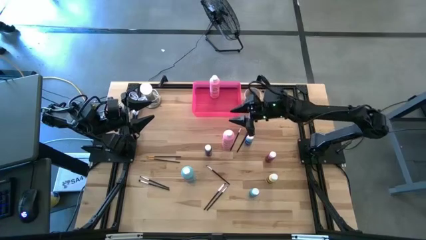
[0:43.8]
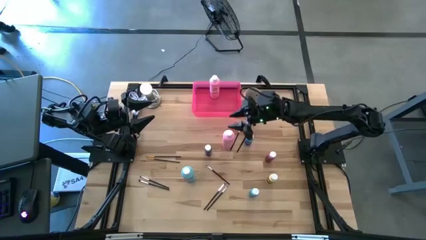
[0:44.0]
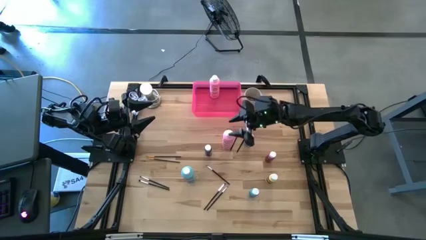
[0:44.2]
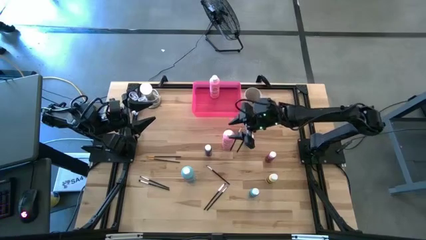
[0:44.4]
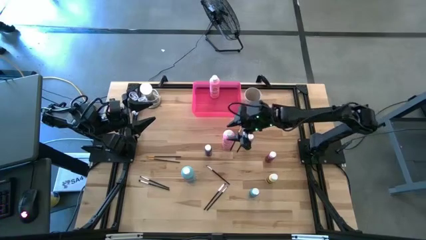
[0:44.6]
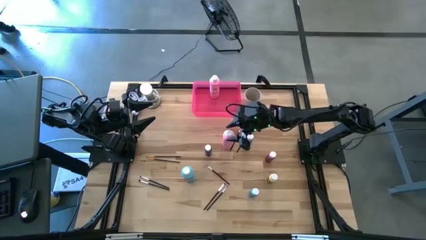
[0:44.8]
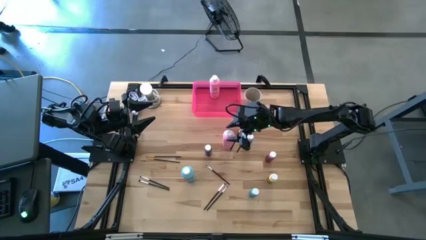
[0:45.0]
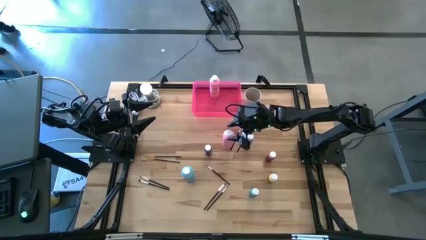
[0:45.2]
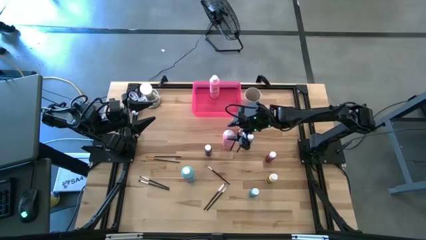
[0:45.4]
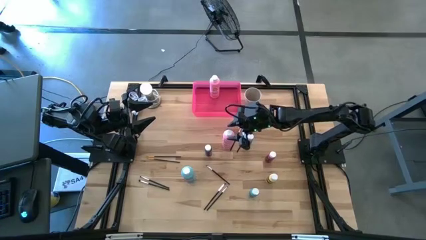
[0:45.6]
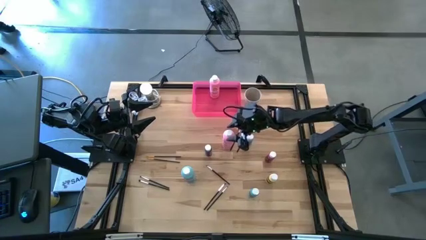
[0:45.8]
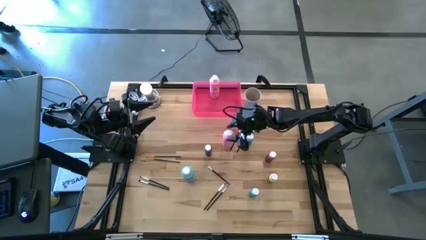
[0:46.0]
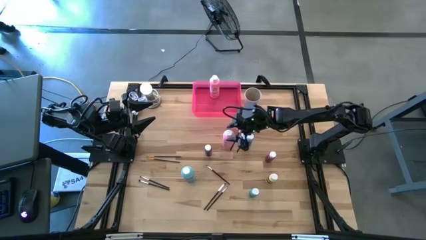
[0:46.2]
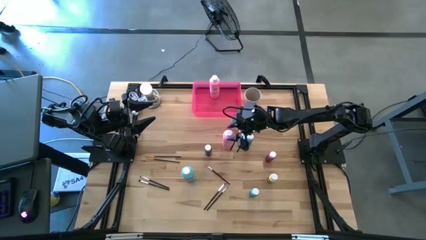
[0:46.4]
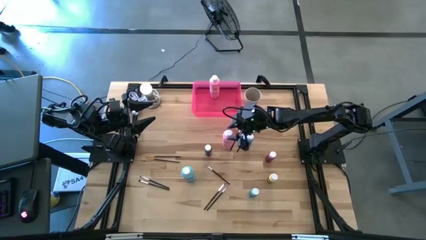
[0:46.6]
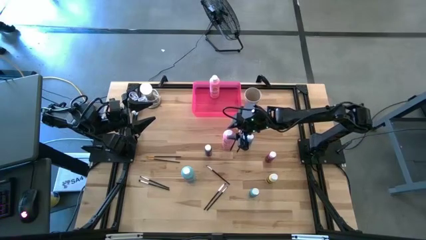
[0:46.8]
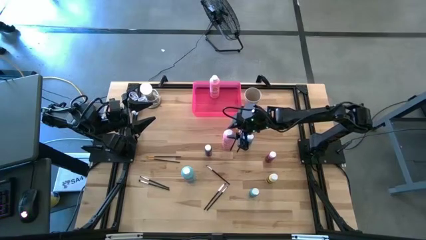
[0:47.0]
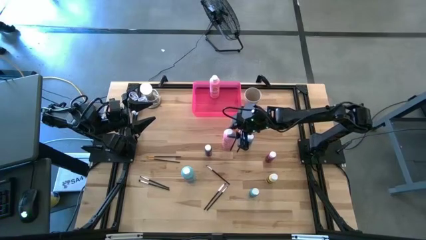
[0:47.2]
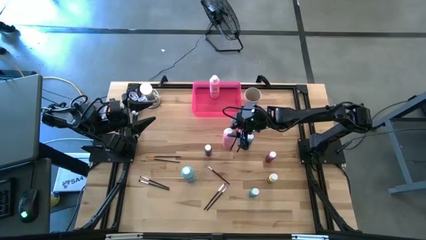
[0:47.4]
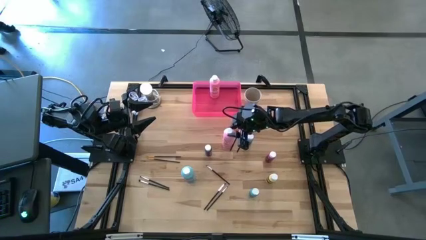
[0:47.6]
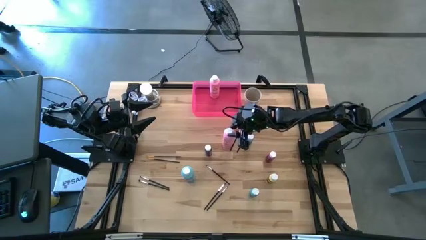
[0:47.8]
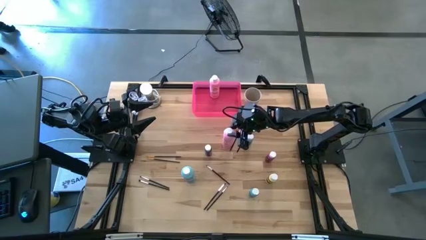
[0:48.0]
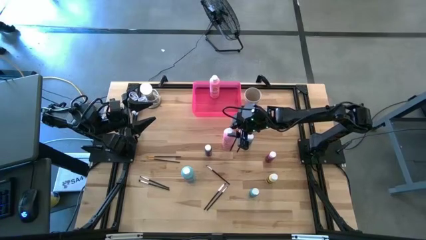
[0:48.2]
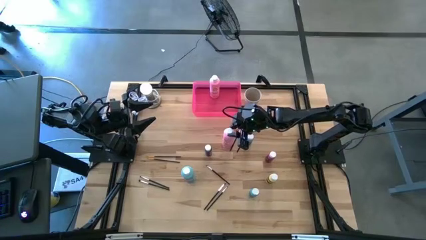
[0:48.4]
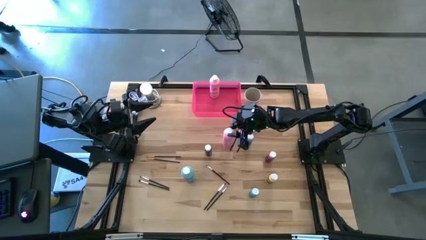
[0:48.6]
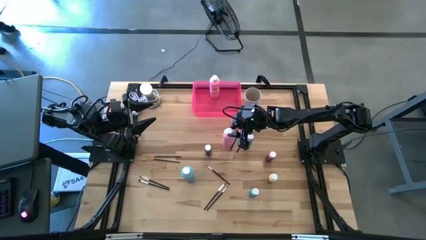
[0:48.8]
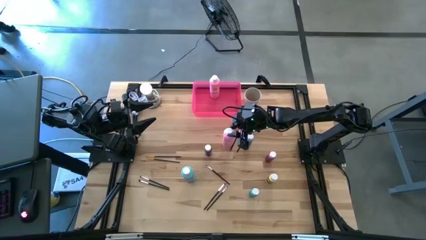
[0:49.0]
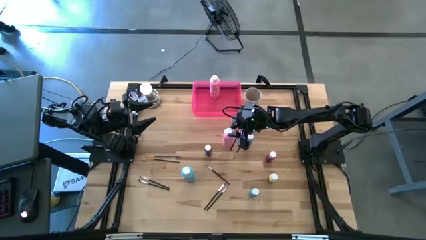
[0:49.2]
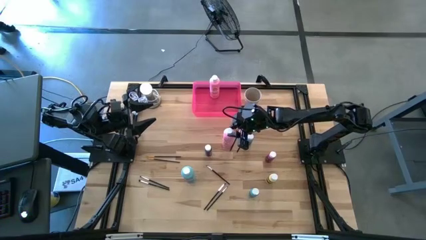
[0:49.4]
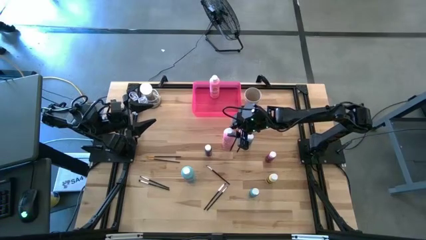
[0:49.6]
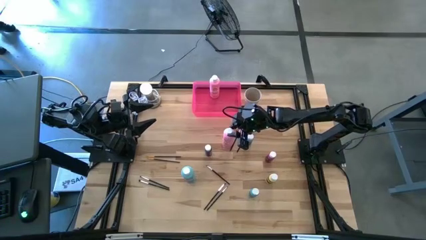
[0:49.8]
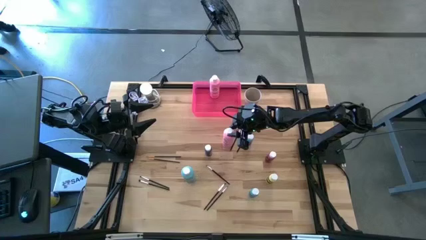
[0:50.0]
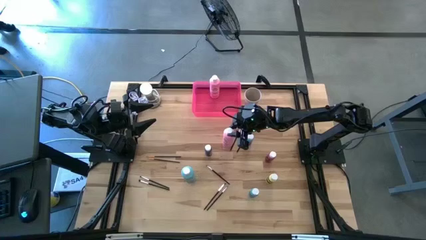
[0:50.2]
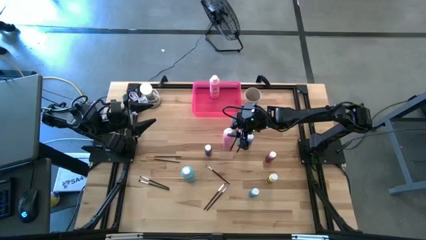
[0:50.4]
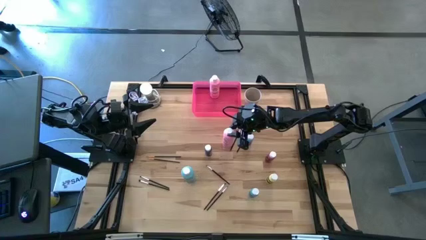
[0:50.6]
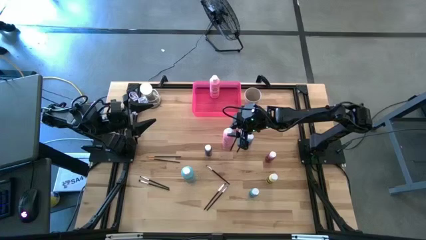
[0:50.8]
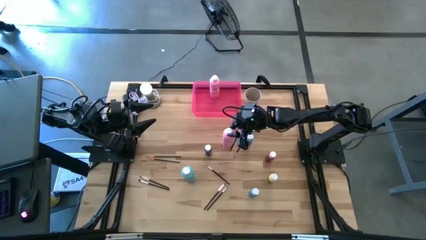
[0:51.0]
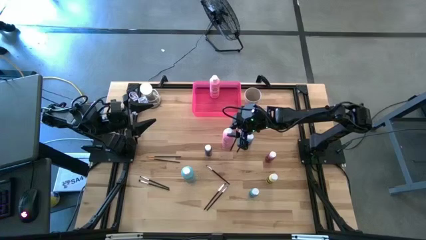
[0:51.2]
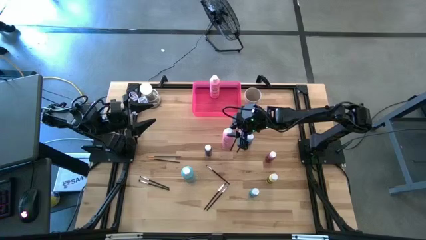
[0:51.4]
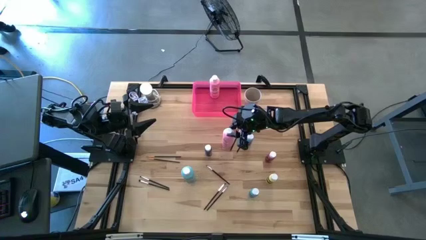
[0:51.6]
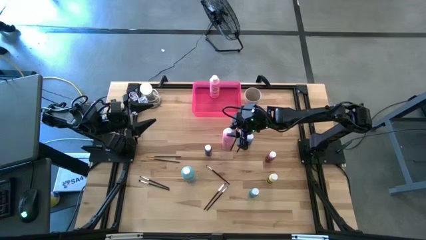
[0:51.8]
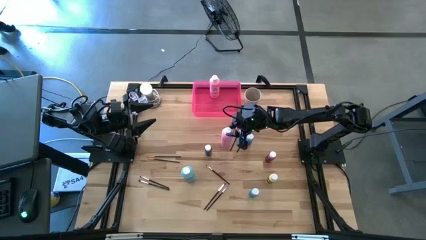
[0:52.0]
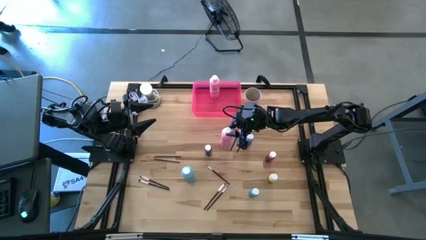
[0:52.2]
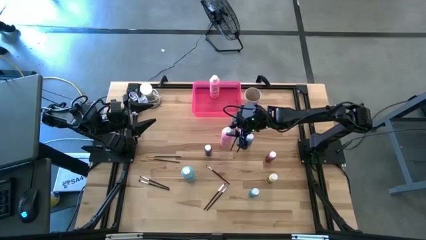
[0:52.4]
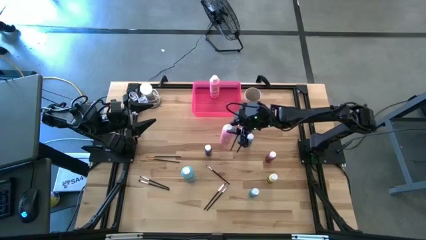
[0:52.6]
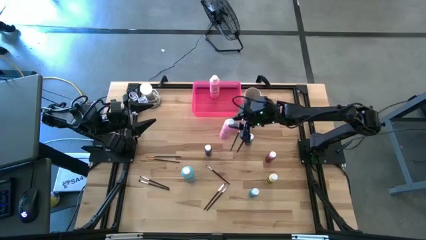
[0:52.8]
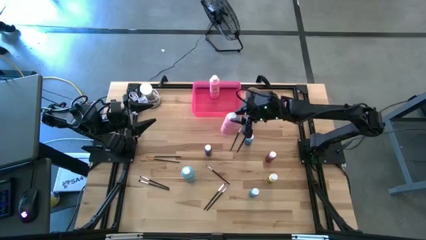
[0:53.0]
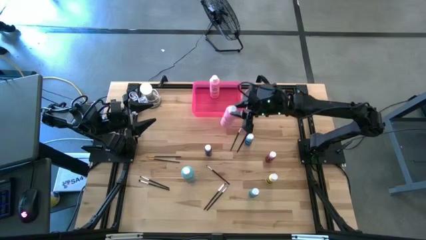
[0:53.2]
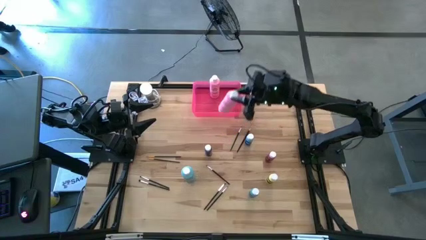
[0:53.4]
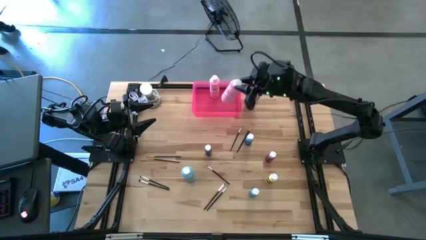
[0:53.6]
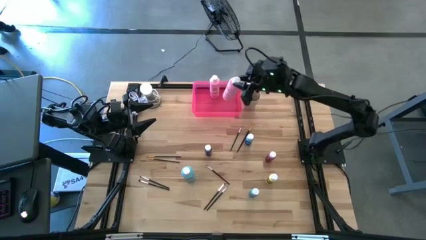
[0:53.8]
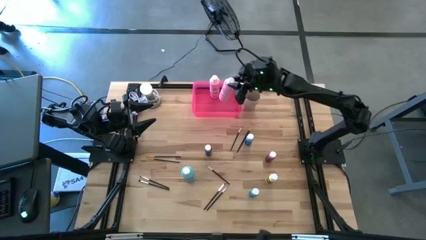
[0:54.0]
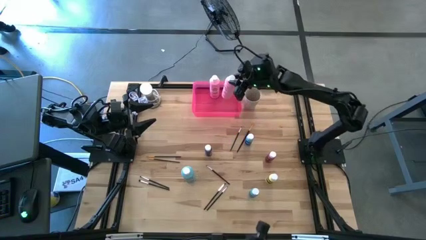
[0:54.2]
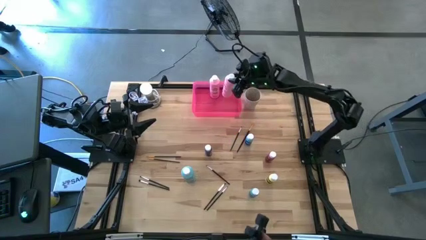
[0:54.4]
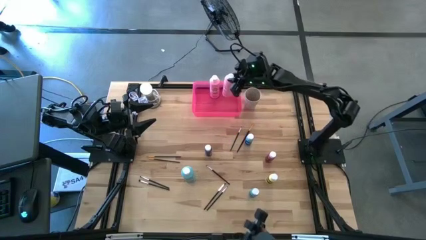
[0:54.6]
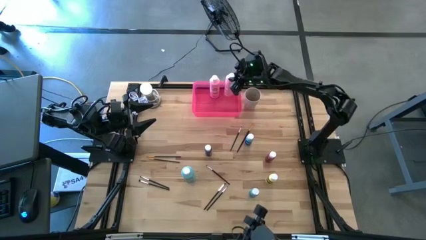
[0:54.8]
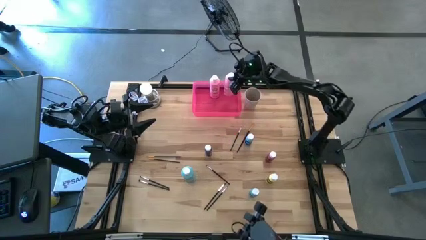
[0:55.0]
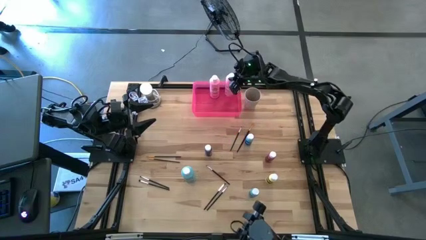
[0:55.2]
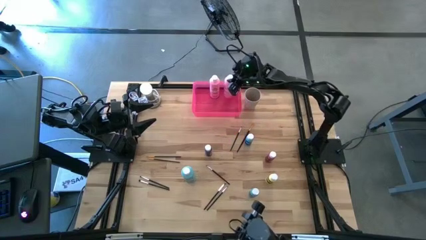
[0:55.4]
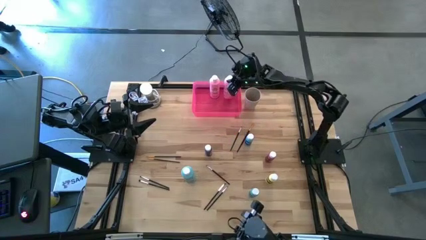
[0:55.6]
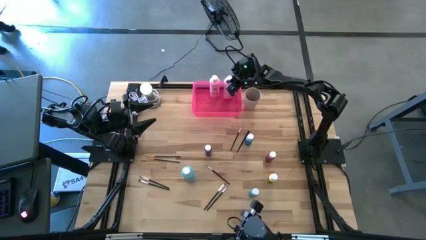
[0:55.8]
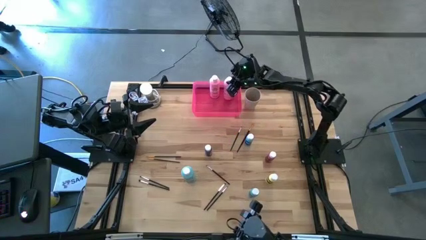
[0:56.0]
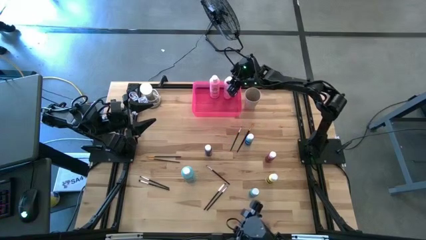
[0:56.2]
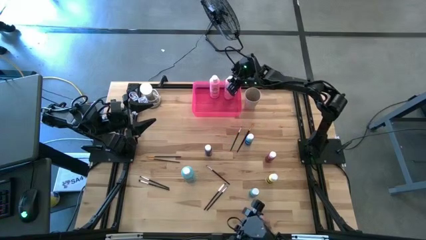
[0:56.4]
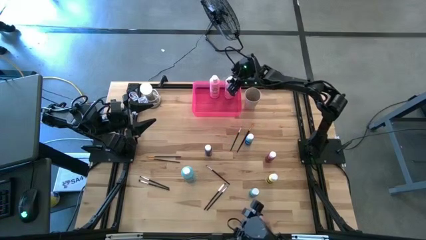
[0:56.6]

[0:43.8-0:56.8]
Task: Pick & Place Paint Supplies
Put the big pink paint bottle into the pink bin
